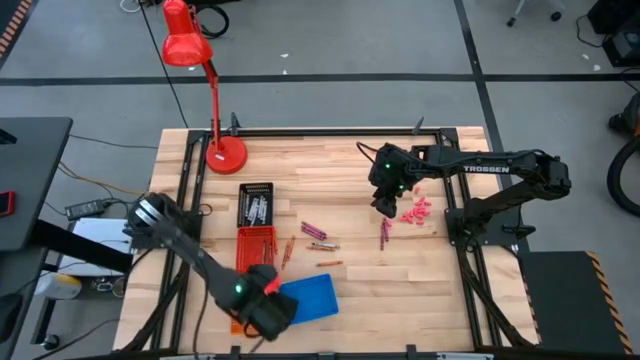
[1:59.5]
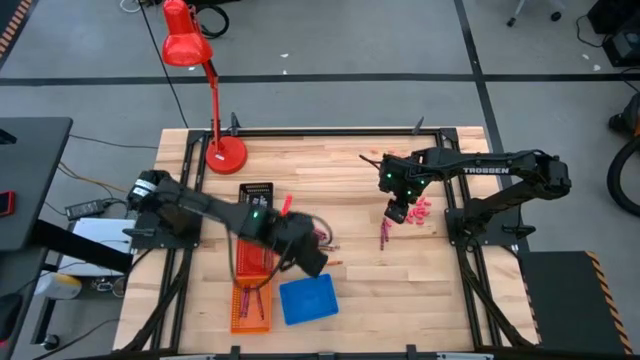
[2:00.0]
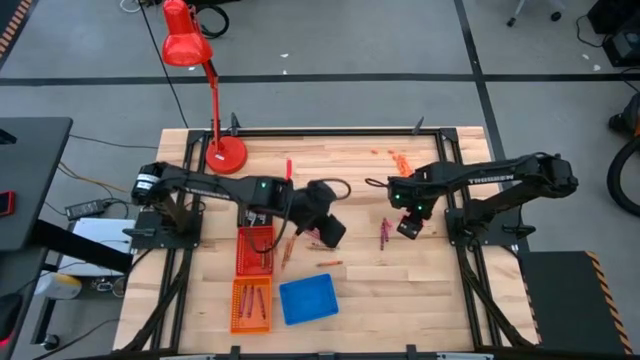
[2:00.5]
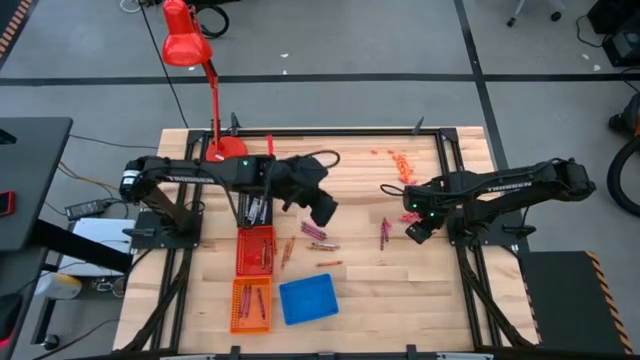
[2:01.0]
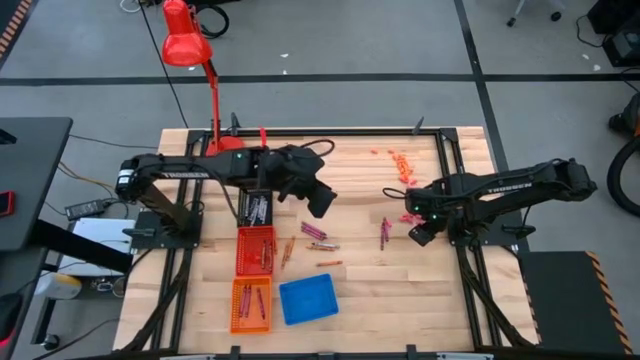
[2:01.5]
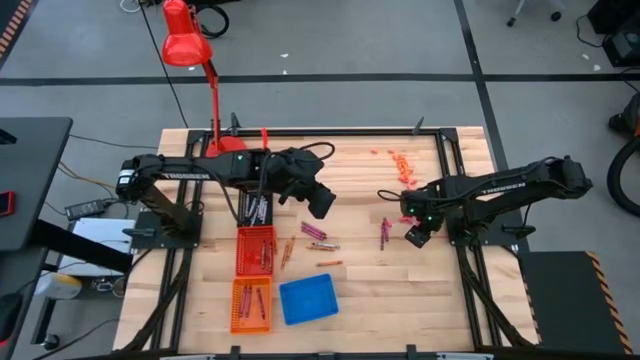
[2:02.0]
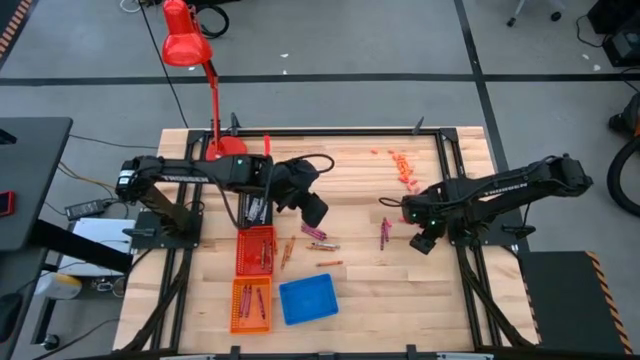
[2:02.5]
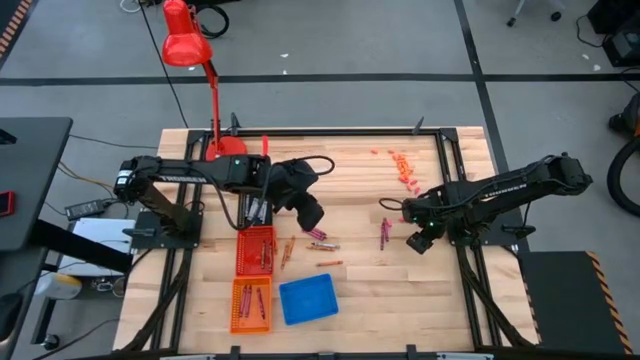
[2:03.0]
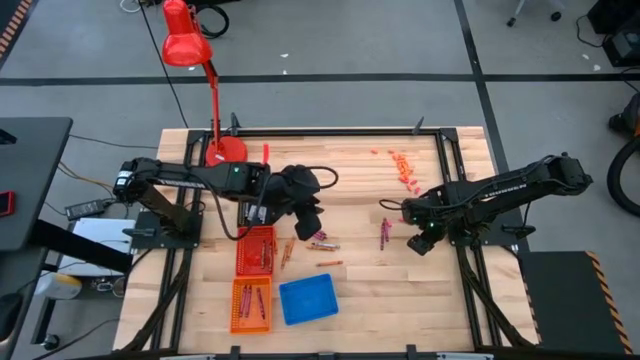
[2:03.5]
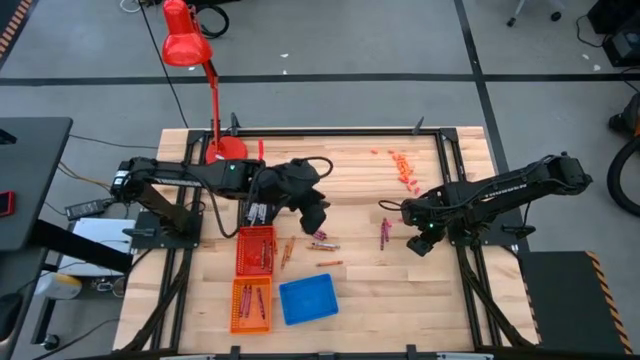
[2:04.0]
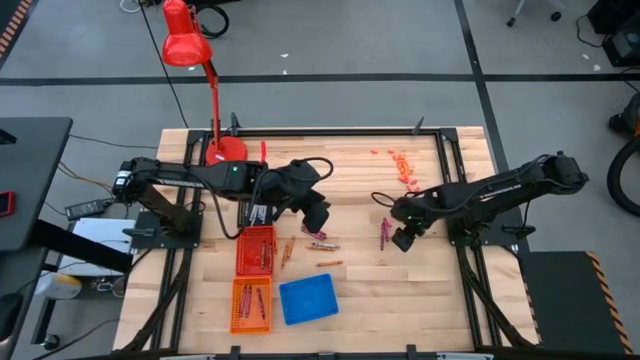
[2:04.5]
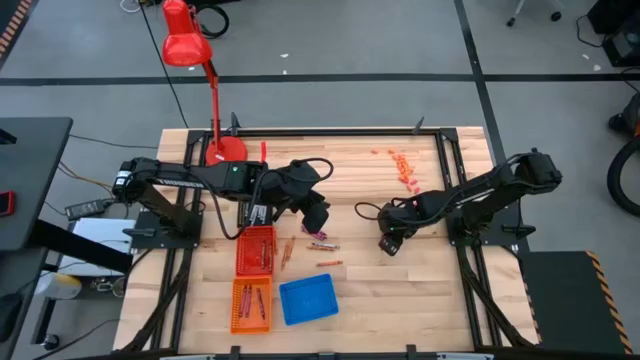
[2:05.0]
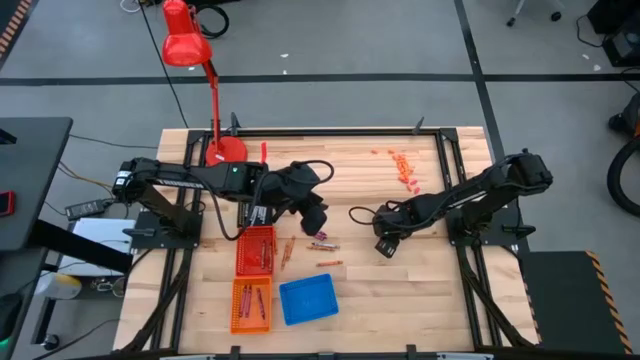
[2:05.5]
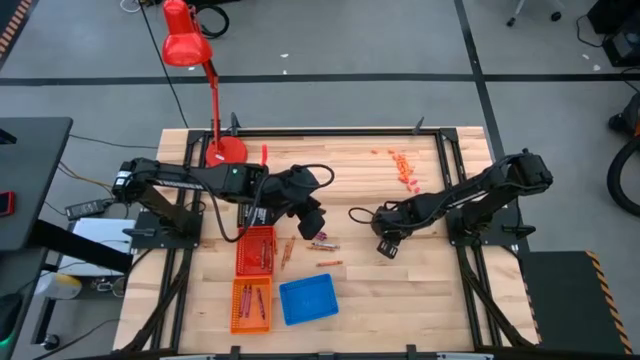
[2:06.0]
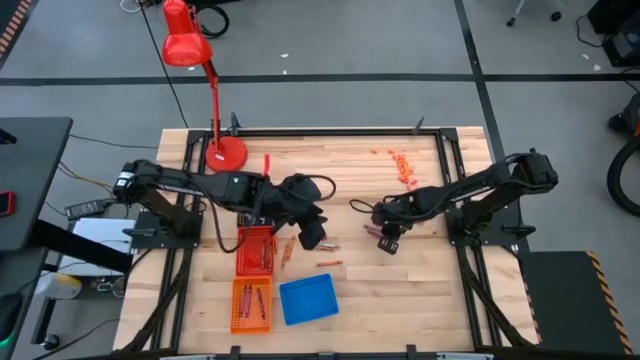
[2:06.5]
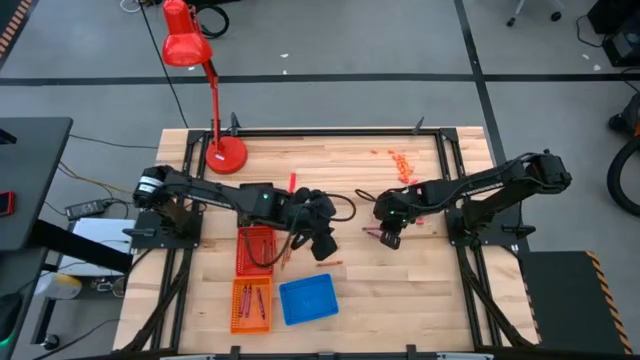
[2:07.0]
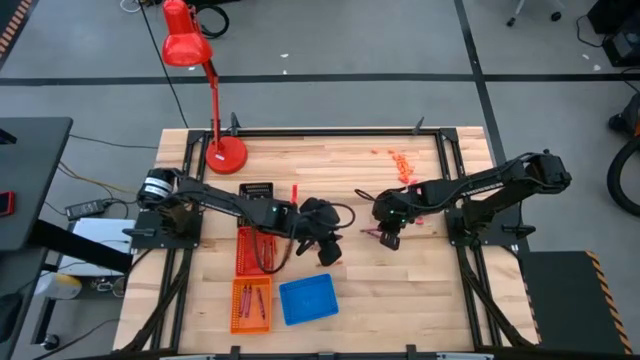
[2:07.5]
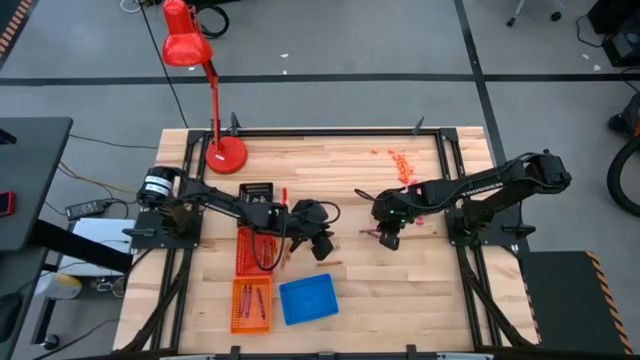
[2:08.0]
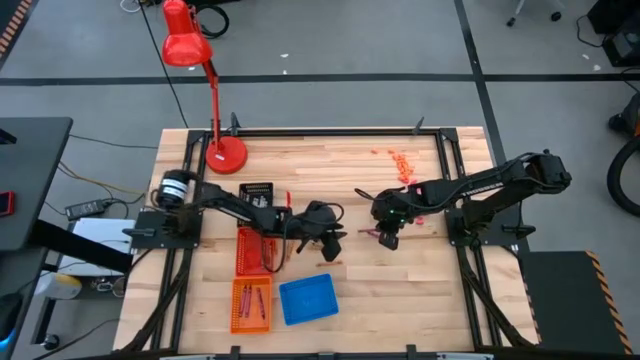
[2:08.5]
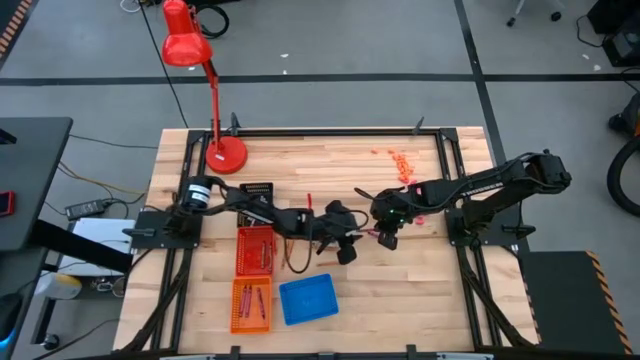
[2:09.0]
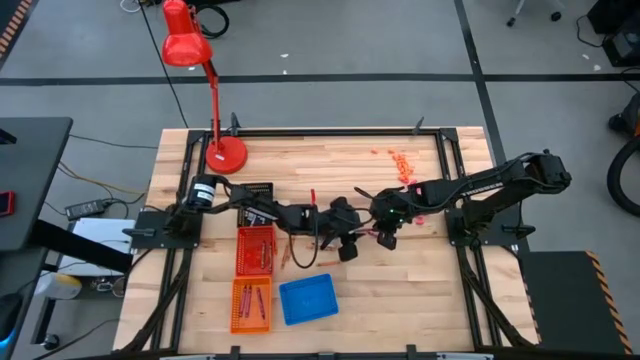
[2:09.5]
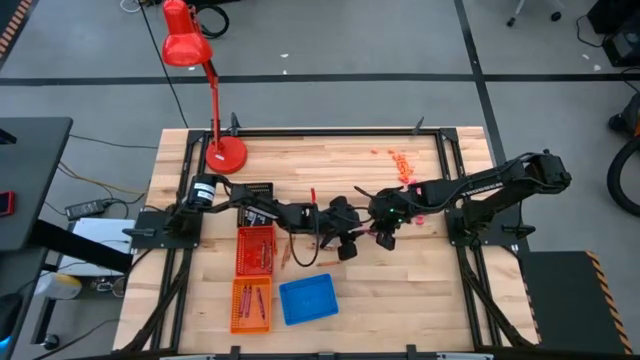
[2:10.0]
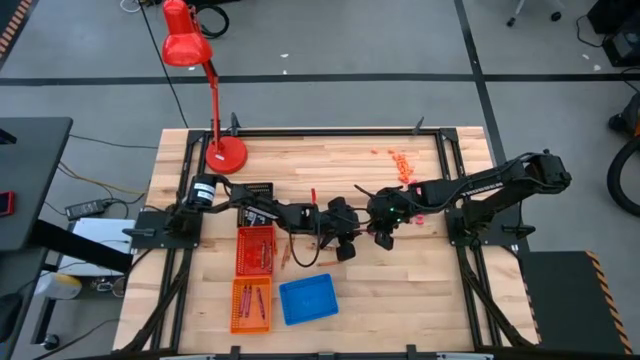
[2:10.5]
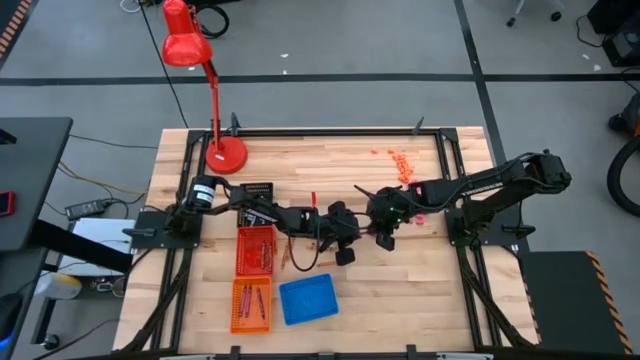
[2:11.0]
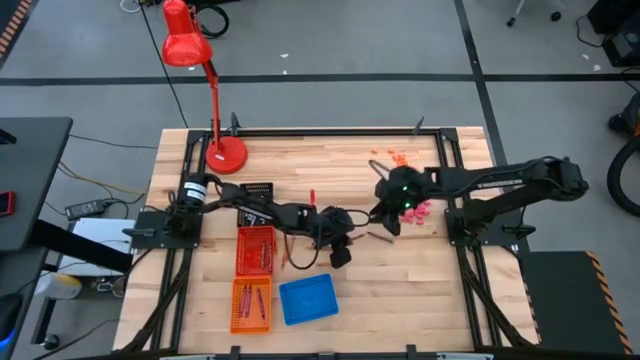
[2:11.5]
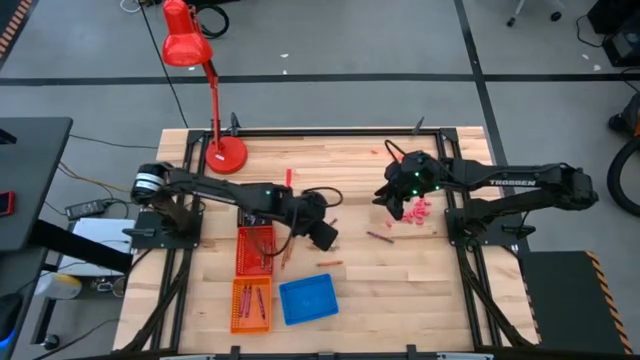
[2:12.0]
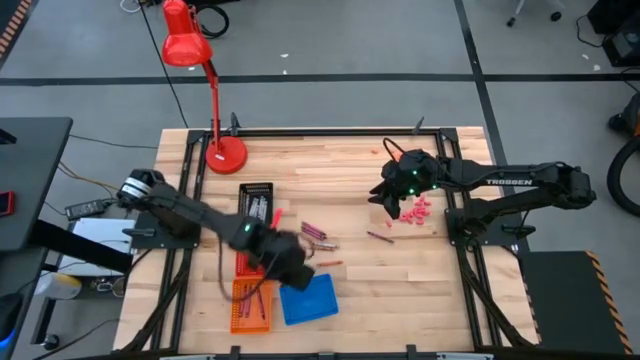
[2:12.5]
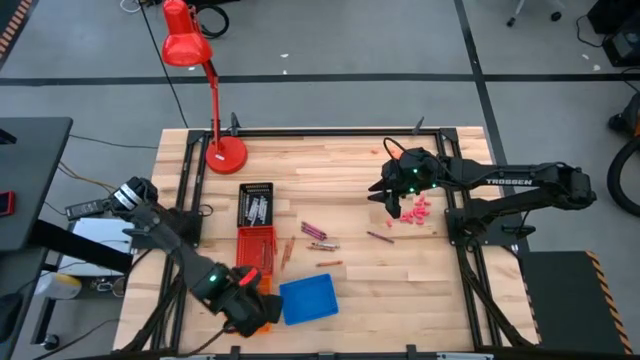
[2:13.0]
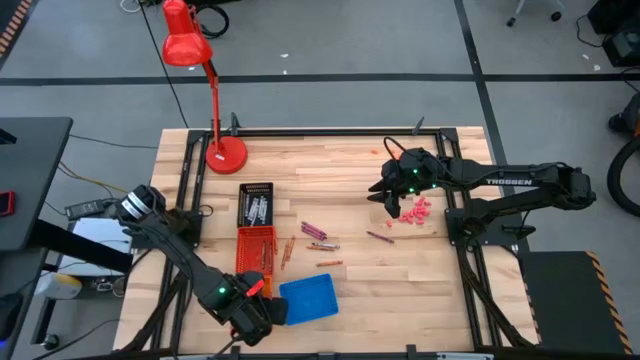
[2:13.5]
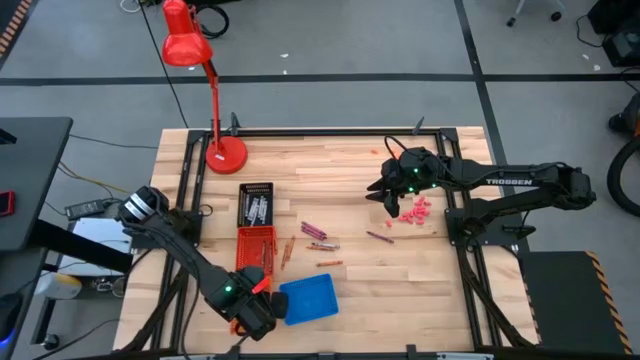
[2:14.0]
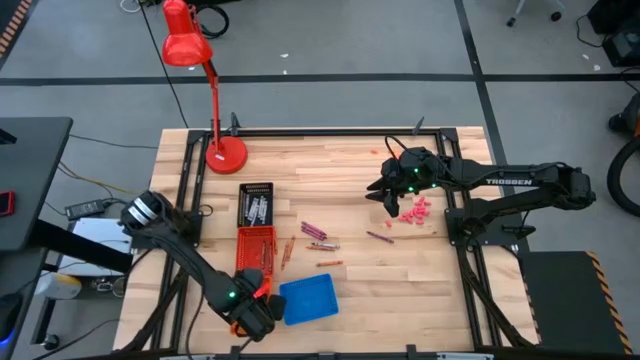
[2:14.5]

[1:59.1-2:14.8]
Task: Sort crayons
Put the red crayon into the orange bin

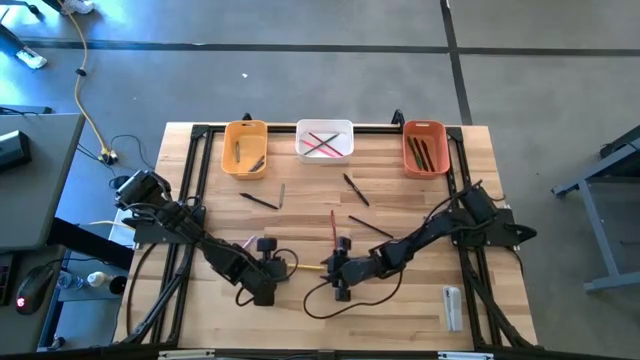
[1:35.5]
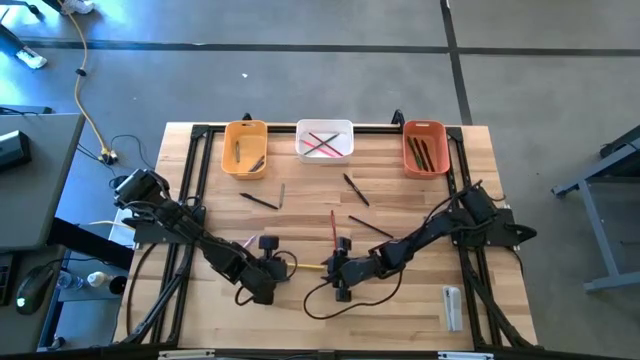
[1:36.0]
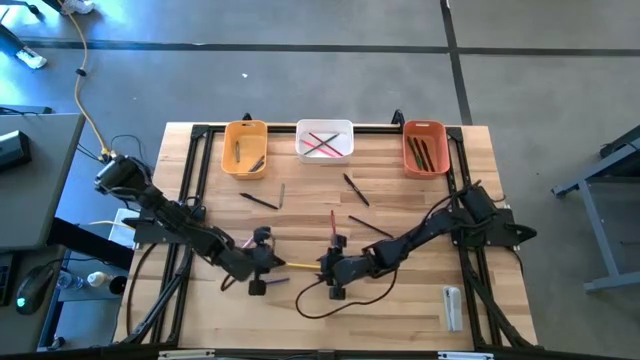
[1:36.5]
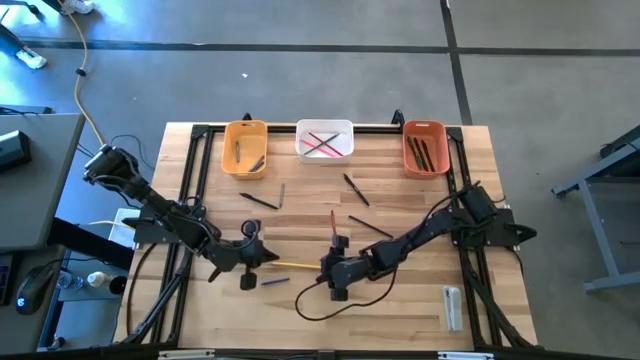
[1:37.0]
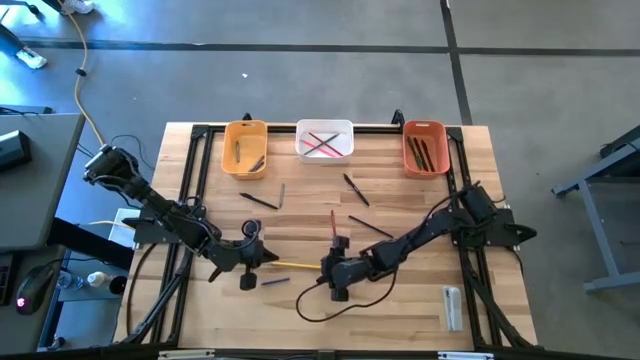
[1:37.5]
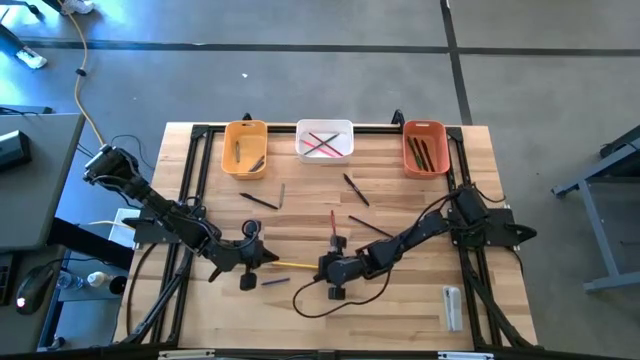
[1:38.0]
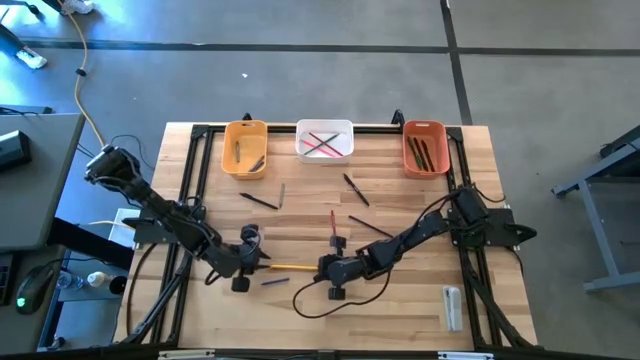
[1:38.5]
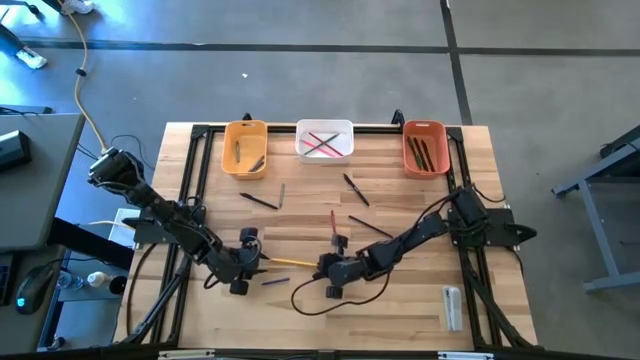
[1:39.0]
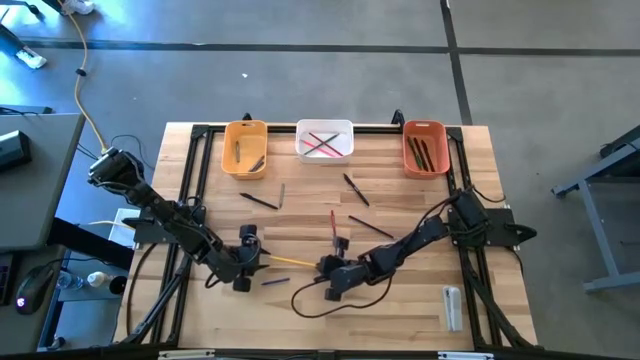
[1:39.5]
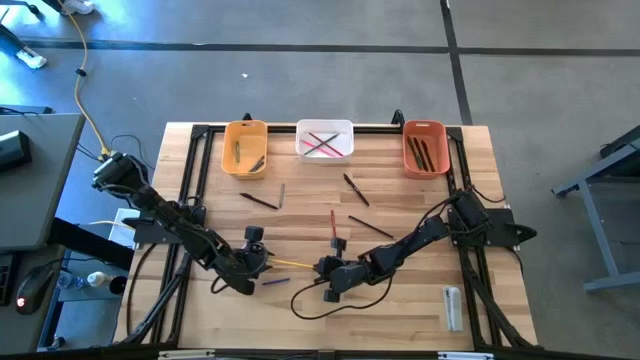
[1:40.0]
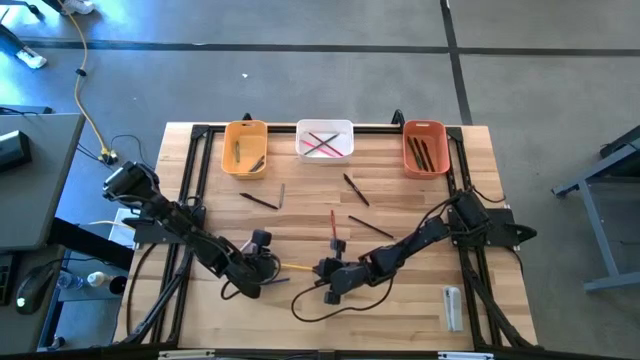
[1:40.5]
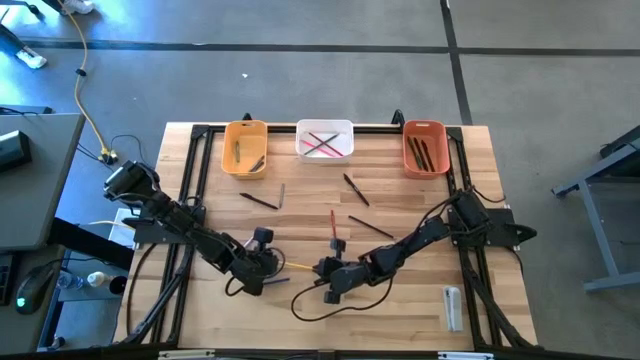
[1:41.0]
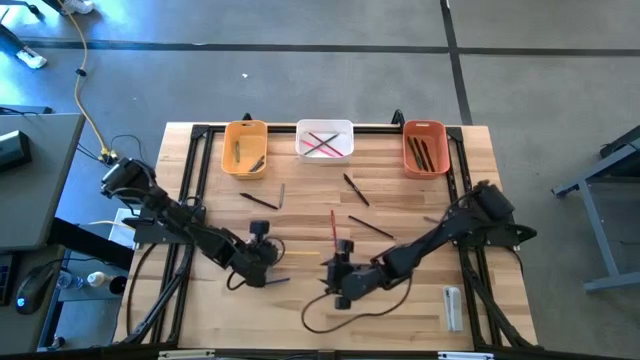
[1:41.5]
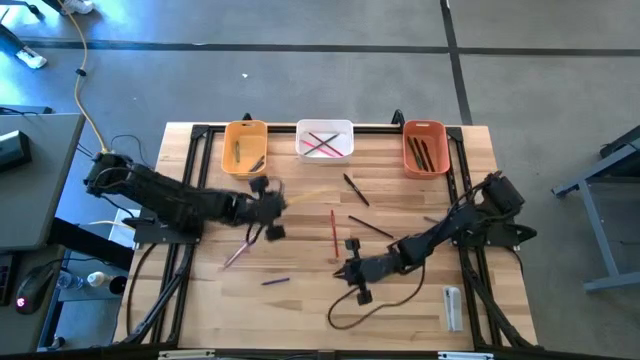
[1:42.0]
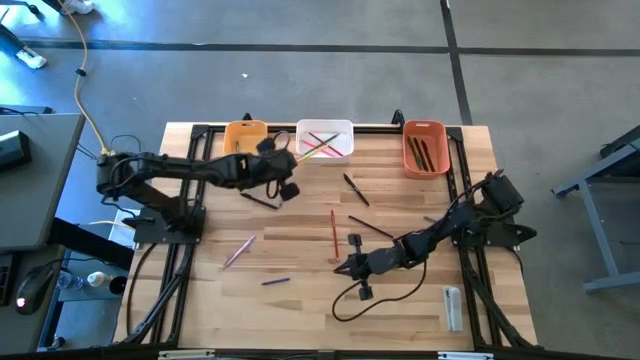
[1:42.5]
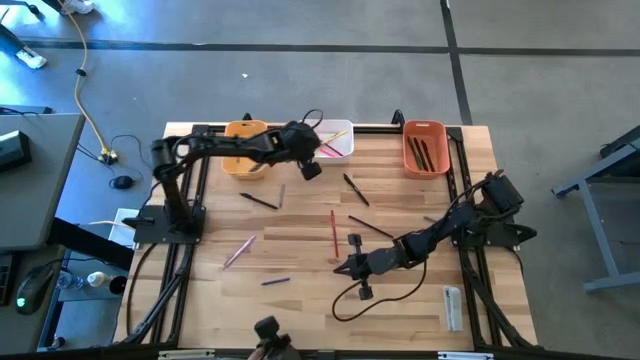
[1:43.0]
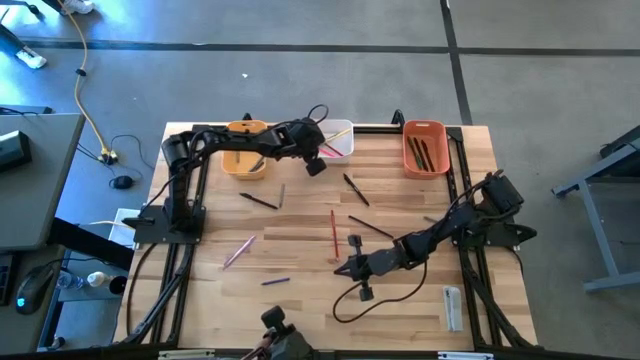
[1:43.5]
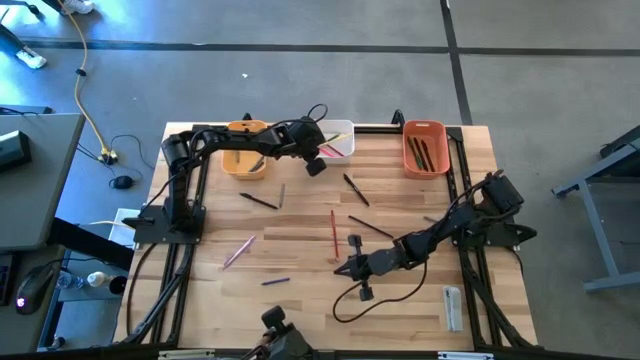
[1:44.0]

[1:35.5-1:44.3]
Task: Sort crayons/erasers/pens/pencils in bins
Put the yellow color pencil into the white bin
